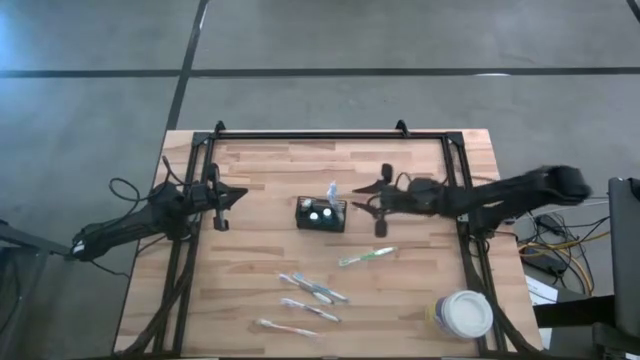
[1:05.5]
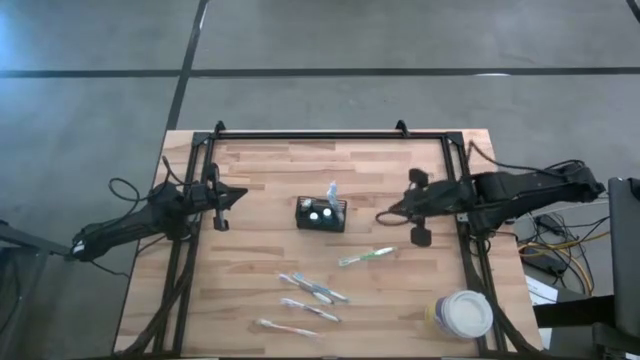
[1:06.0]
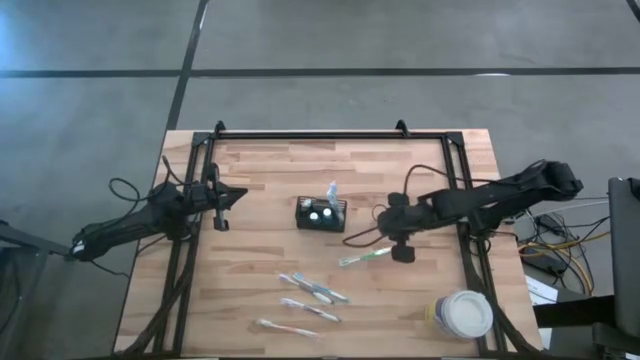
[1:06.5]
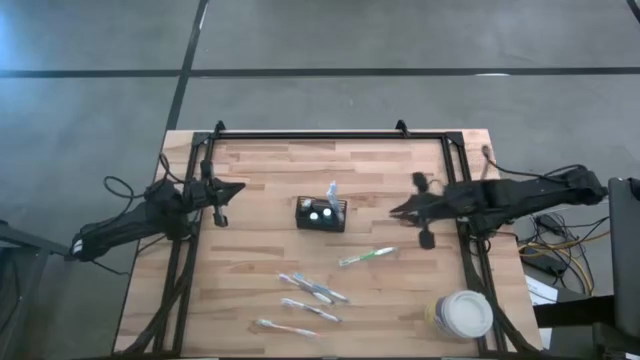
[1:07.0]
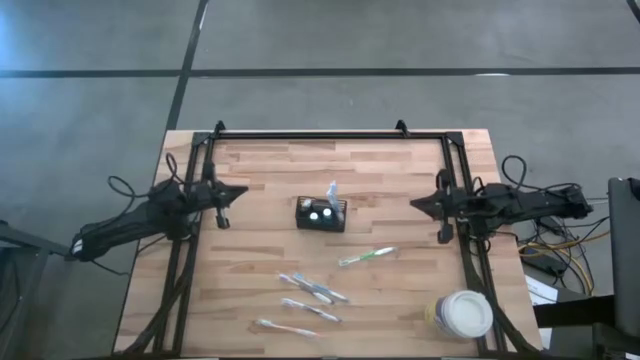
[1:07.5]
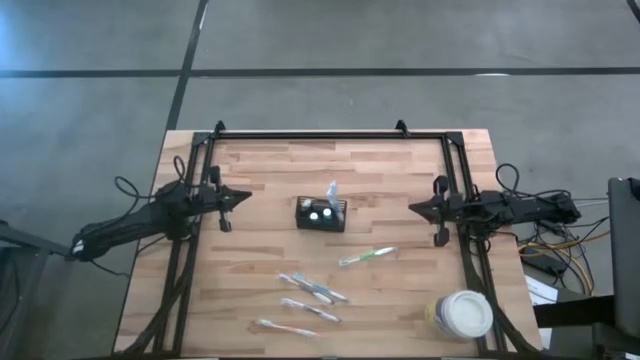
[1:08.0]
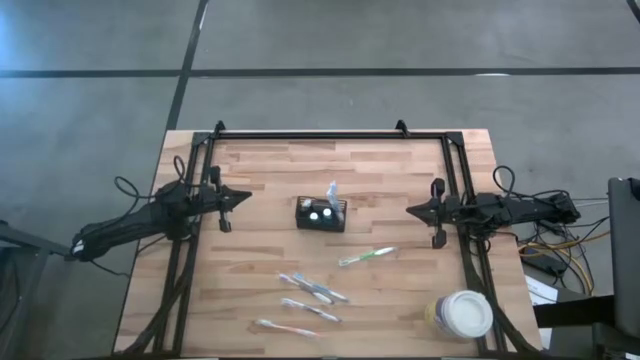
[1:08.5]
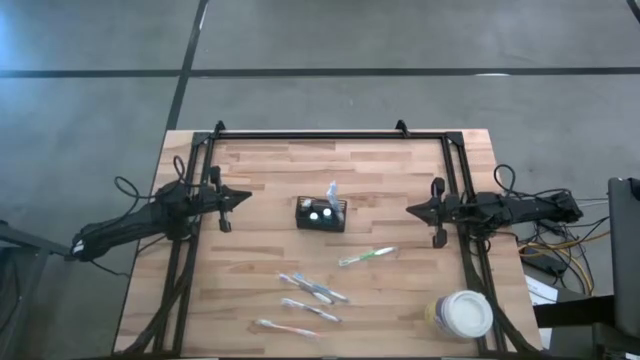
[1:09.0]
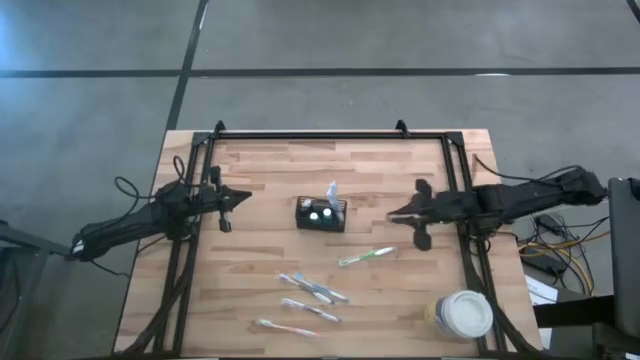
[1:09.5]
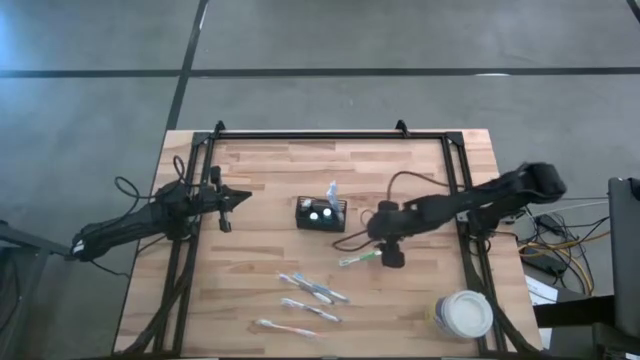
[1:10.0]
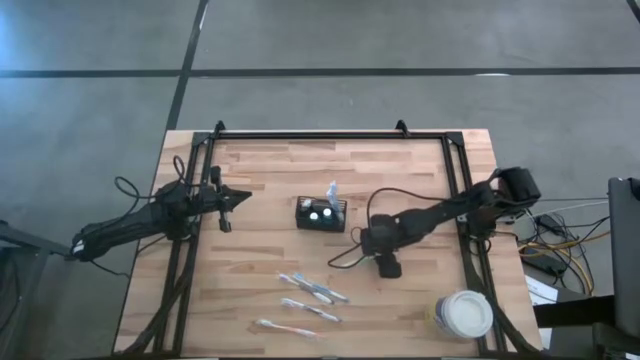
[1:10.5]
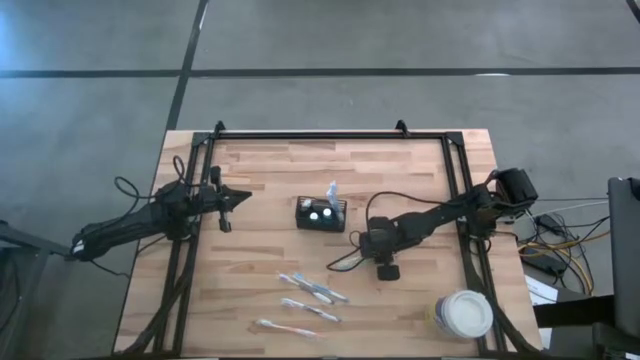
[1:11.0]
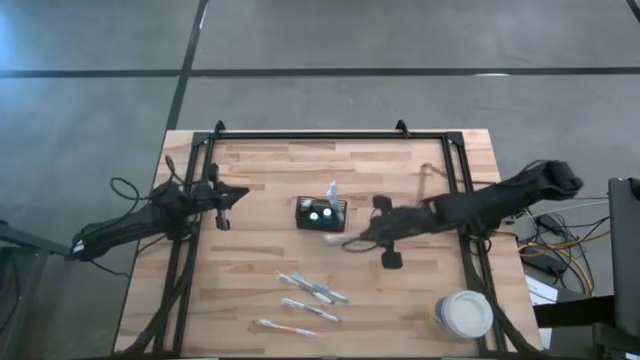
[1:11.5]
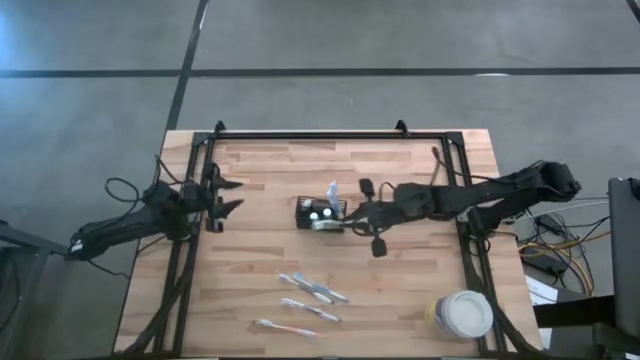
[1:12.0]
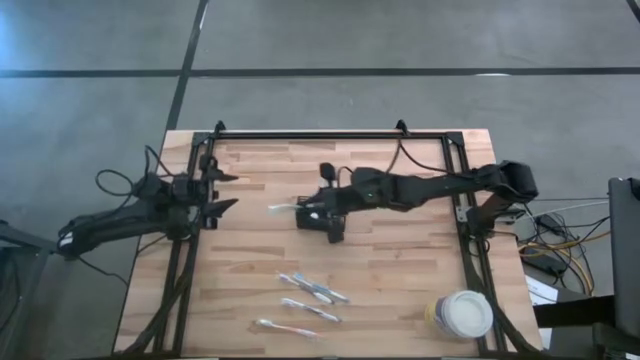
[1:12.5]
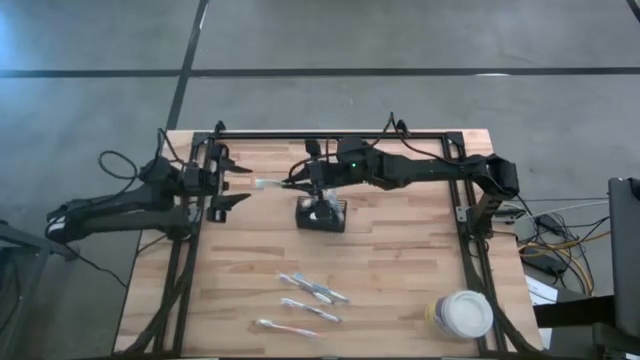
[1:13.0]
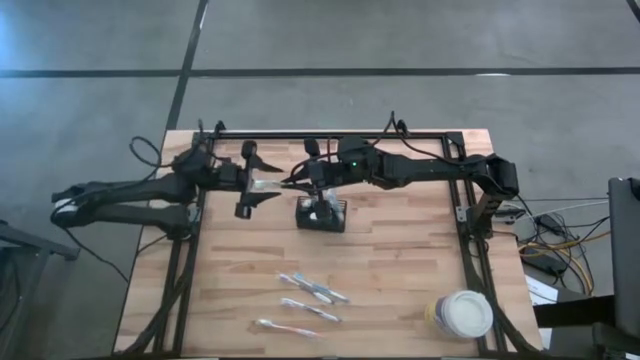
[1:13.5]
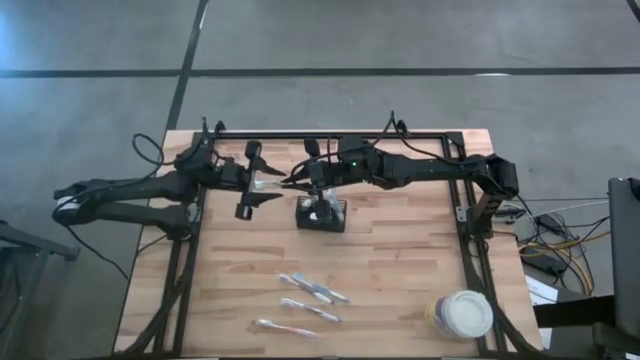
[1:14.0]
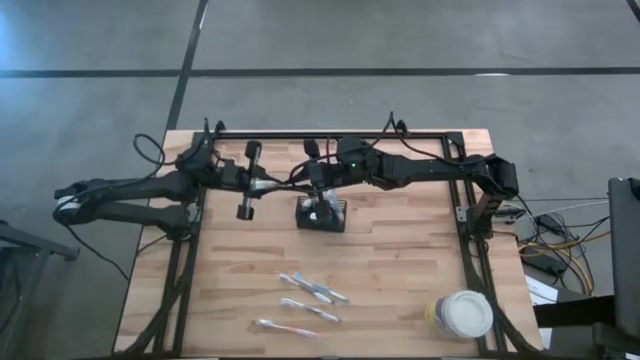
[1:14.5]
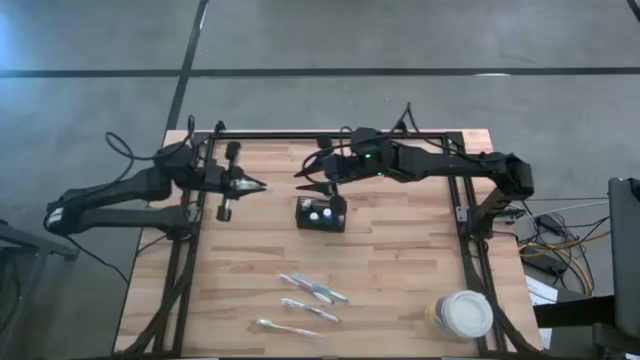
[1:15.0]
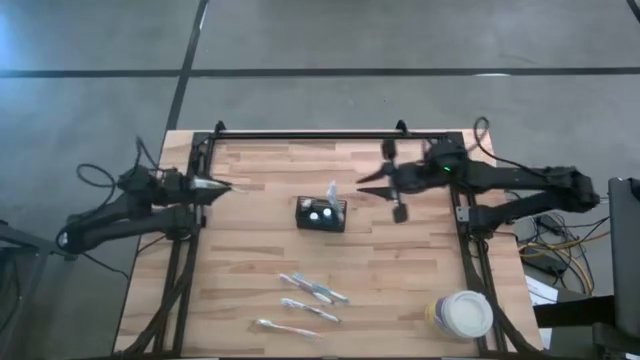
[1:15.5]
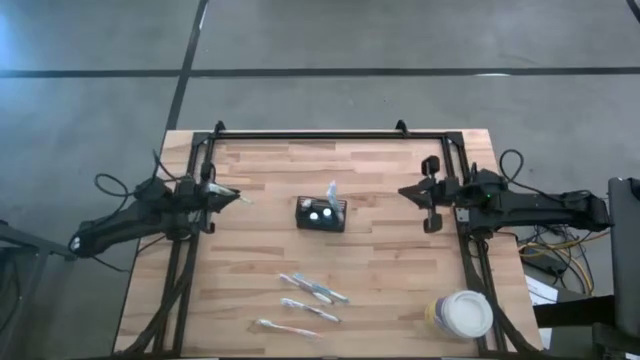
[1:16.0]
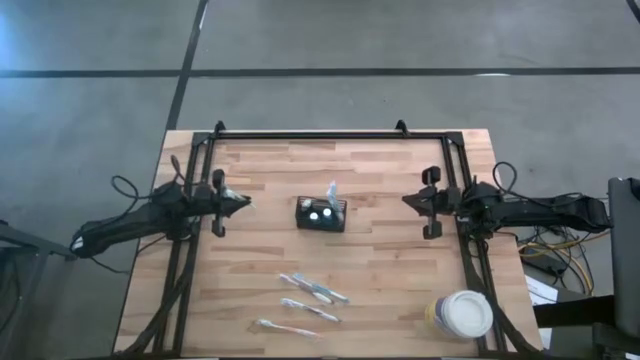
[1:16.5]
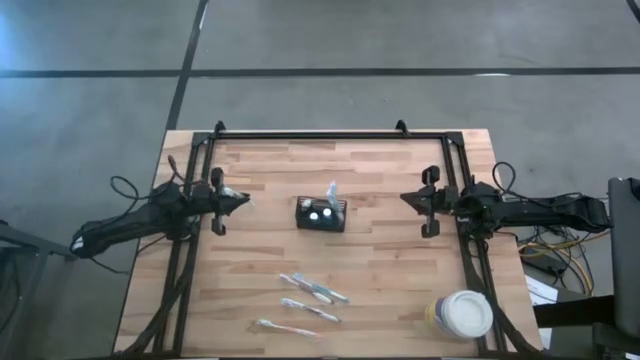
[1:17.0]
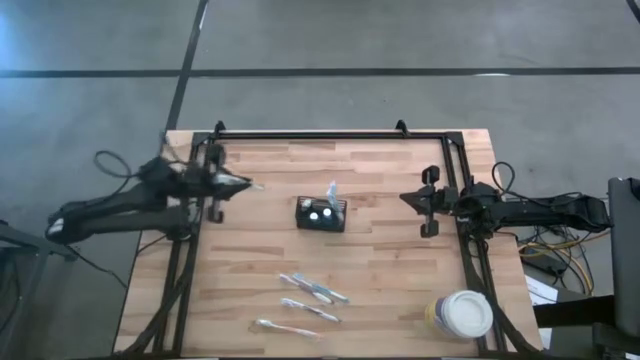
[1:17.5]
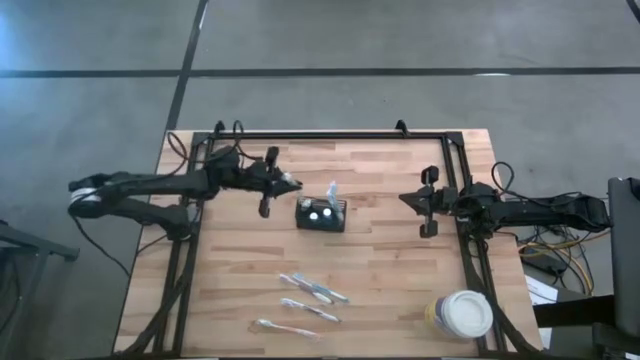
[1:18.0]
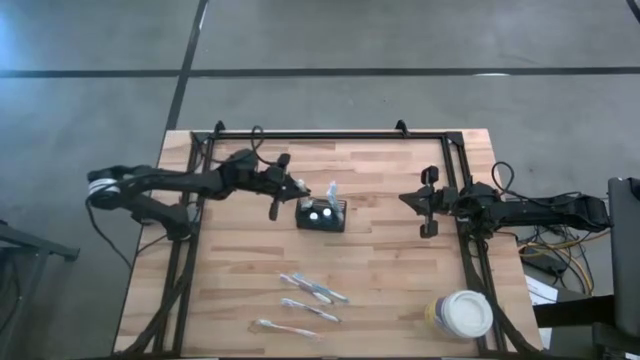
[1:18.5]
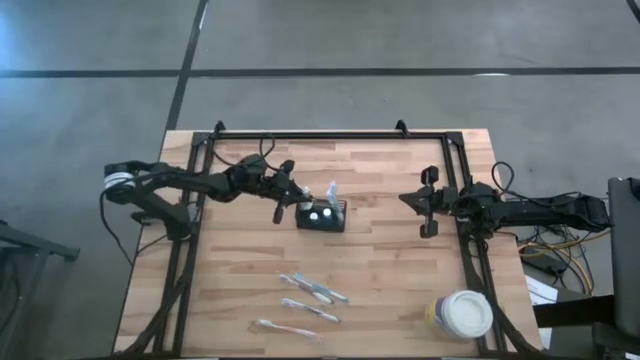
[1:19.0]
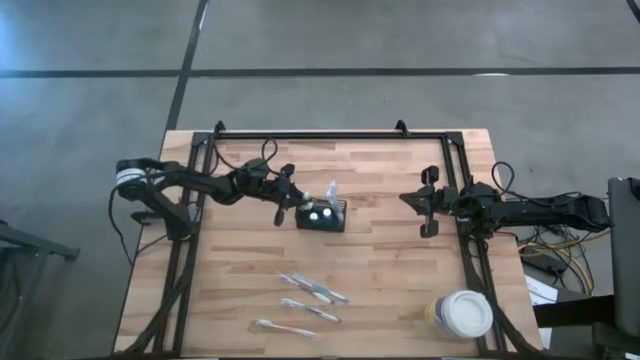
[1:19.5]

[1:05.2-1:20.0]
Task: Pick & Place toothbrushing station
Put the green toothbrush into the wire organizer

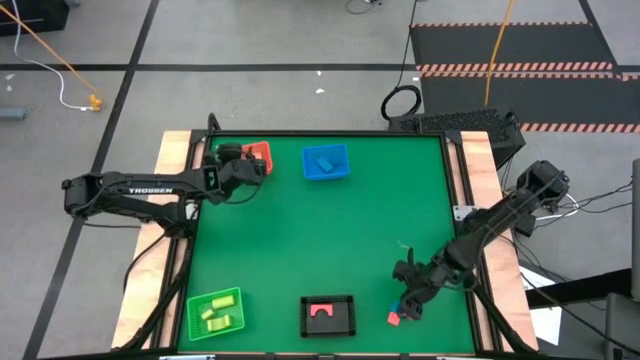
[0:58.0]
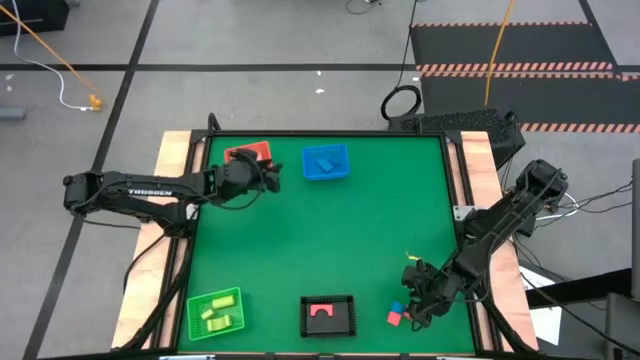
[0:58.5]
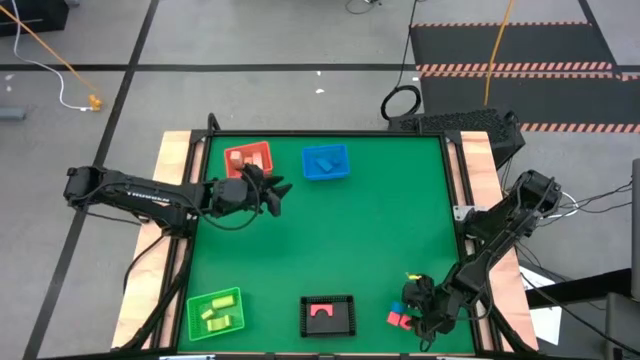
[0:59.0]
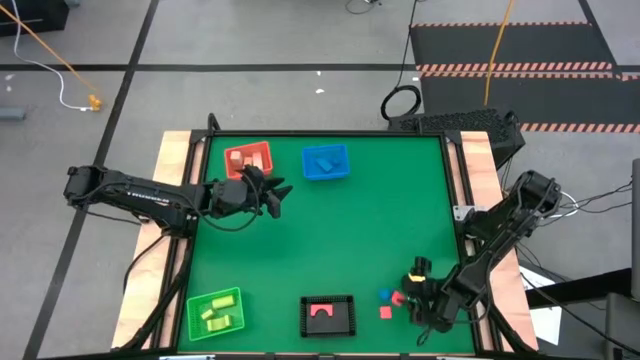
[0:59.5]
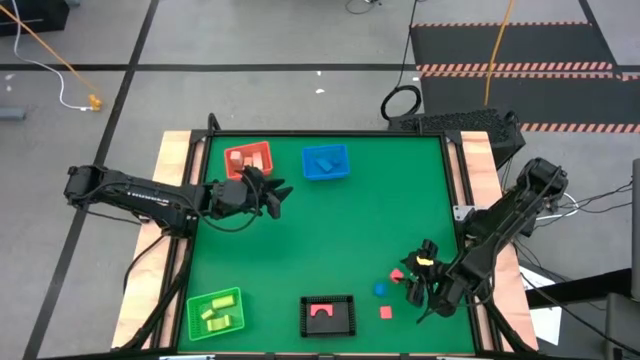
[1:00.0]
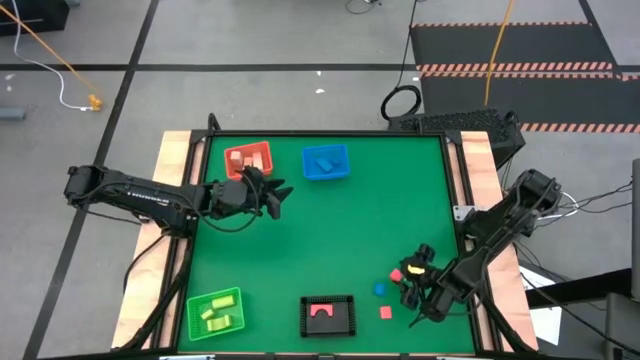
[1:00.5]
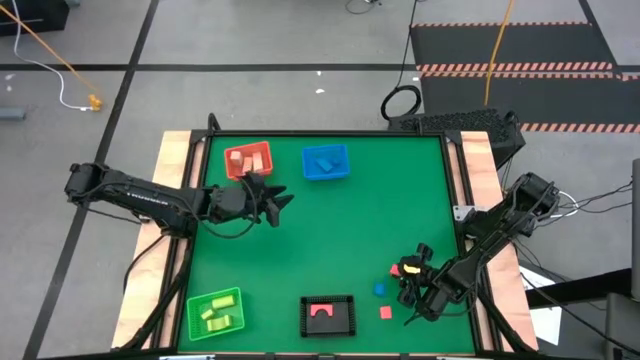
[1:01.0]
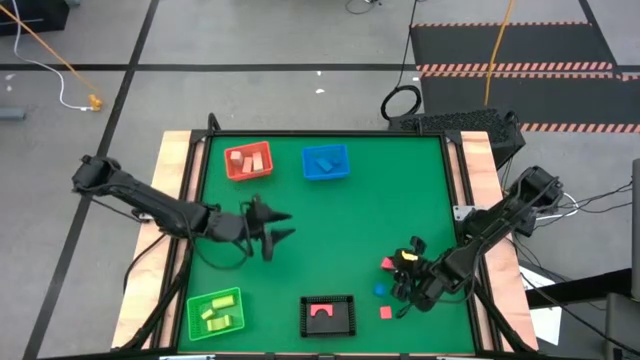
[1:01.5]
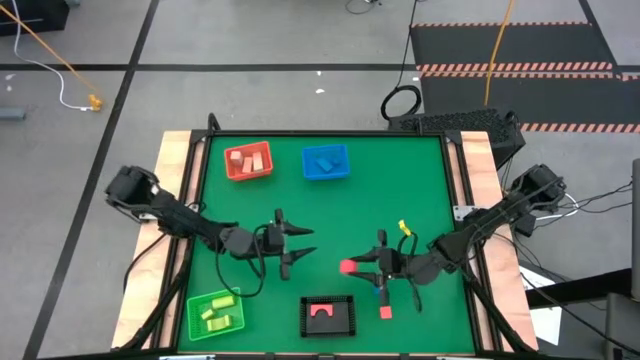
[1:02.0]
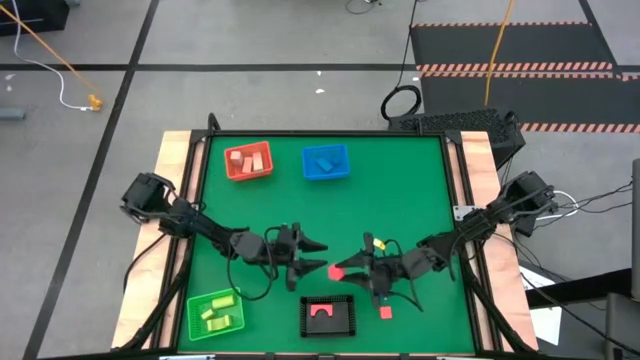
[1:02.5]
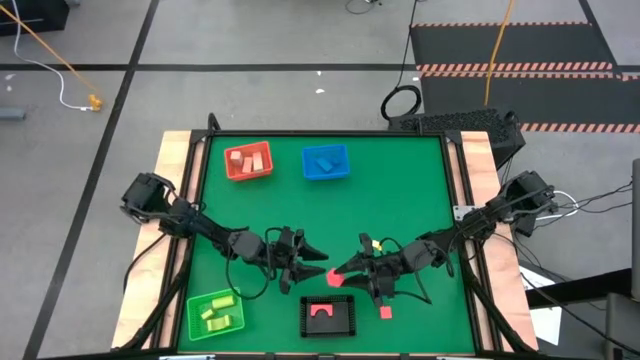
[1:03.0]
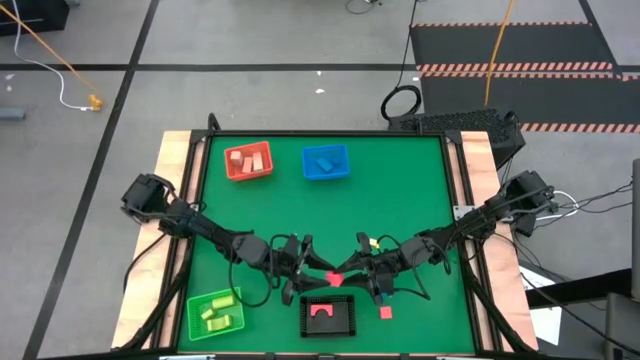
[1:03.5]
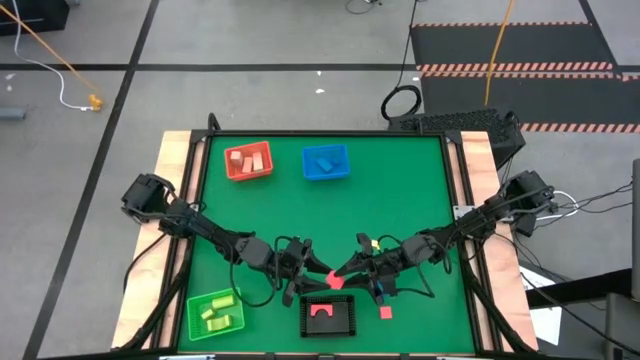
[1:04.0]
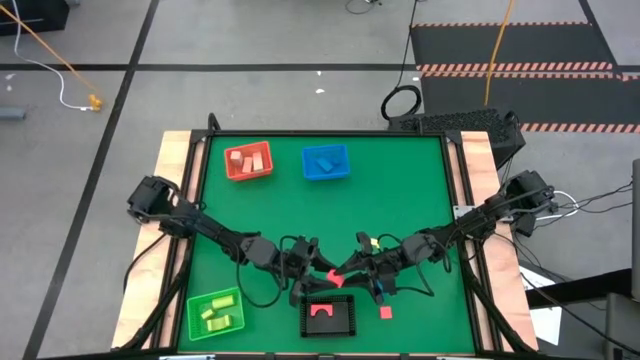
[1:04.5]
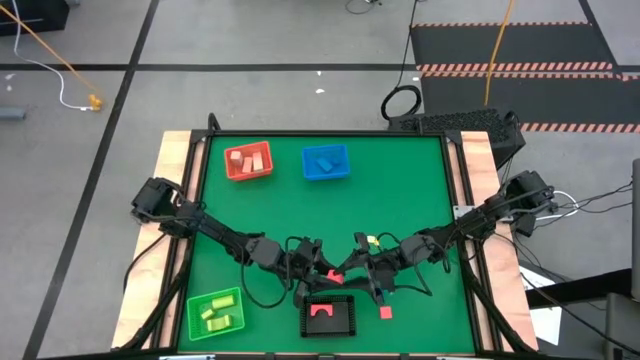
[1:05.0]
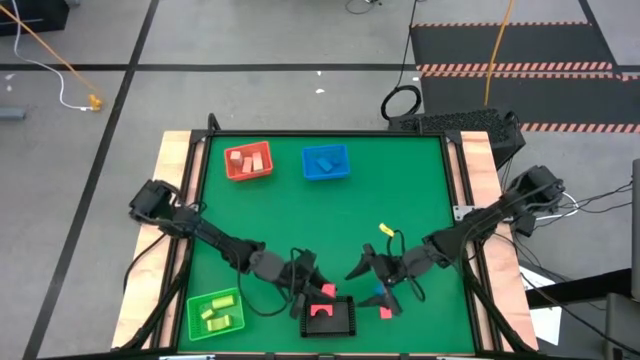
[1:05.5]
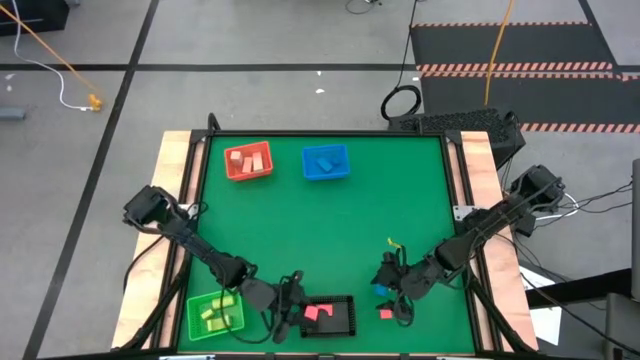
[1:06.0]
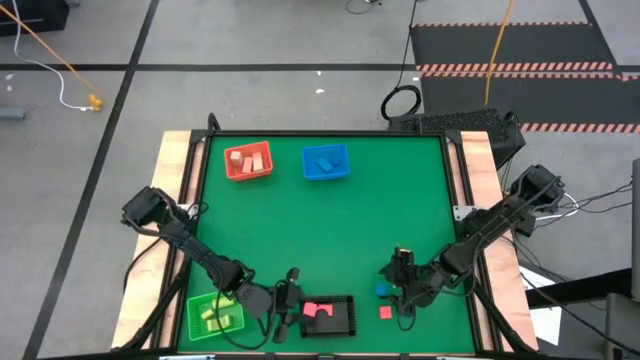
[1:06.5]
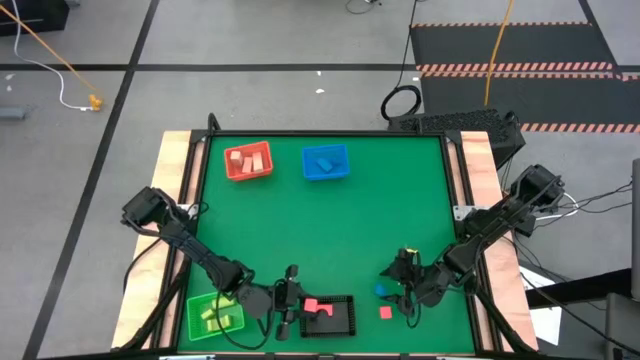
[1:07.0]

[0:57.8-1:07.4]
Task: Sort & place blocks by color
Put the top red block into the black bin
